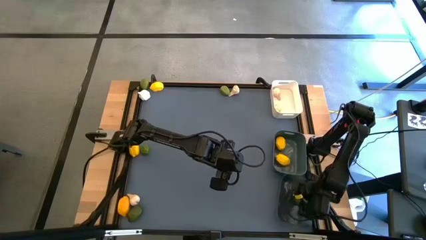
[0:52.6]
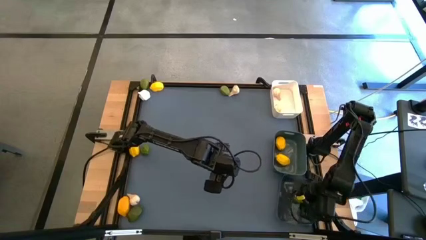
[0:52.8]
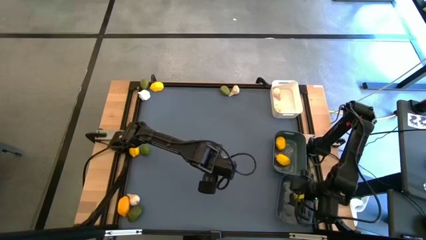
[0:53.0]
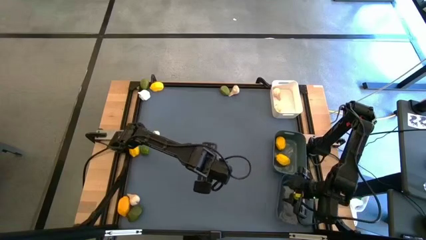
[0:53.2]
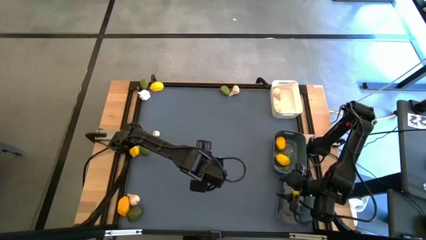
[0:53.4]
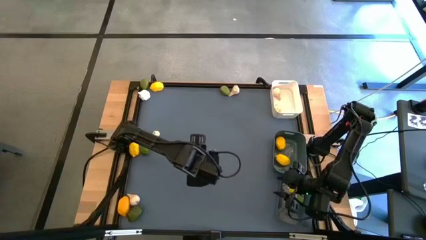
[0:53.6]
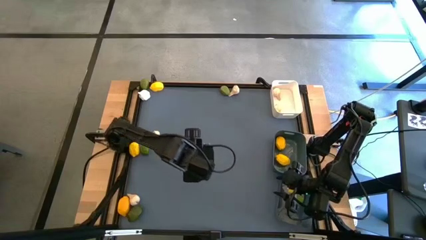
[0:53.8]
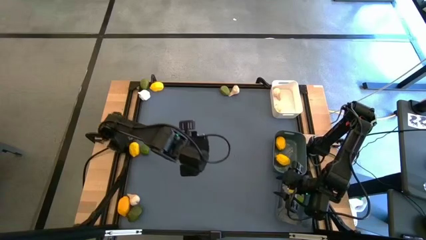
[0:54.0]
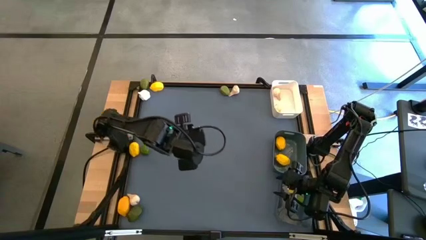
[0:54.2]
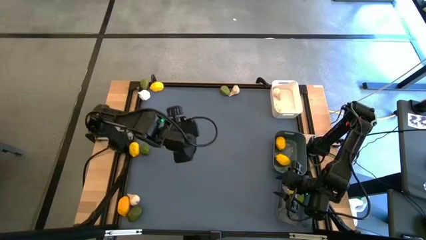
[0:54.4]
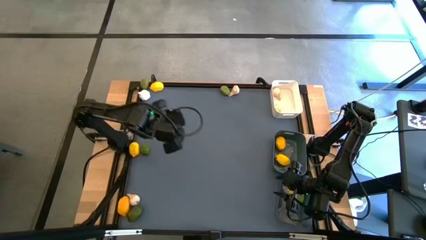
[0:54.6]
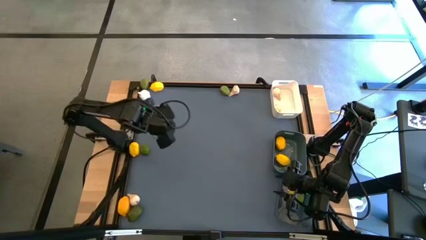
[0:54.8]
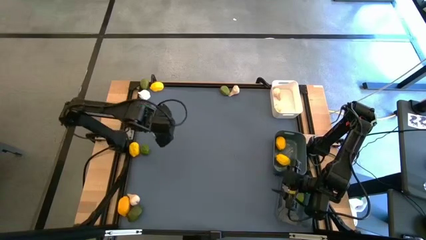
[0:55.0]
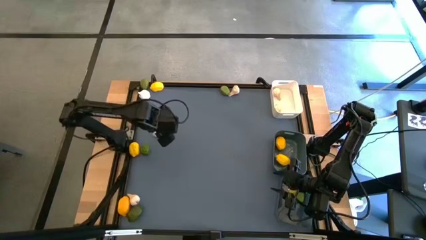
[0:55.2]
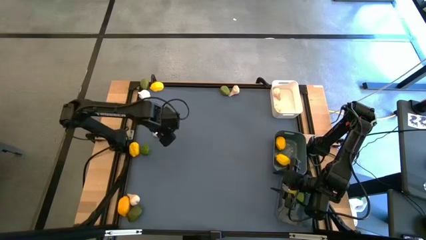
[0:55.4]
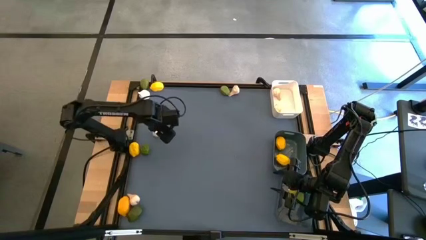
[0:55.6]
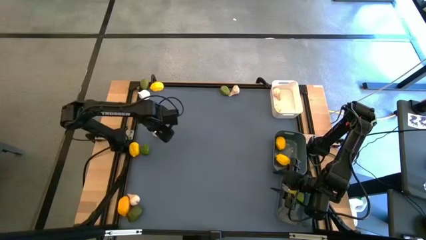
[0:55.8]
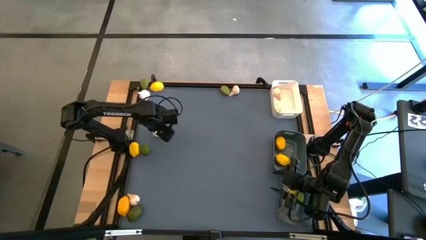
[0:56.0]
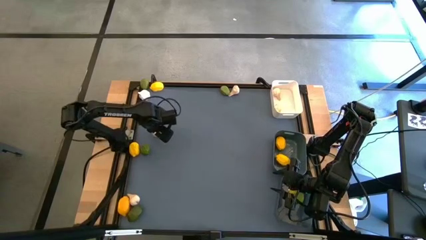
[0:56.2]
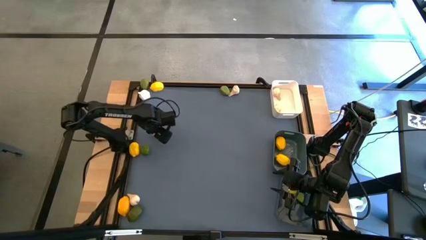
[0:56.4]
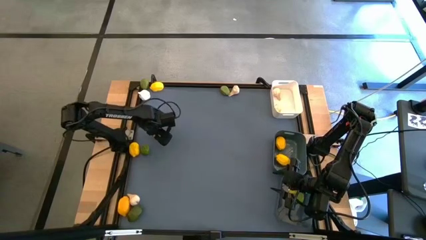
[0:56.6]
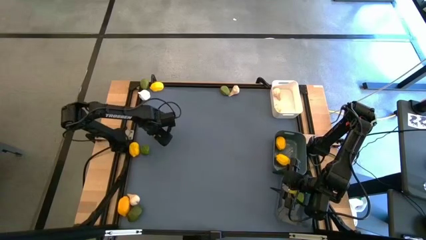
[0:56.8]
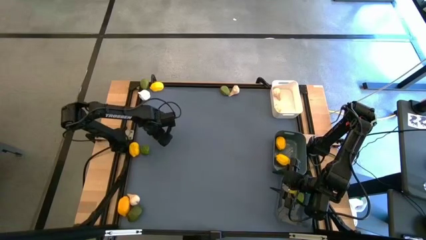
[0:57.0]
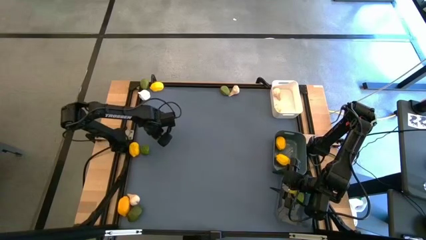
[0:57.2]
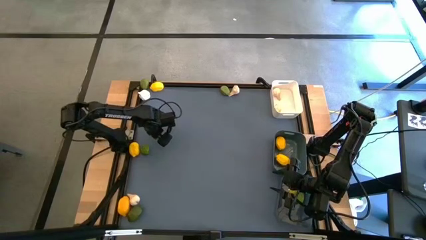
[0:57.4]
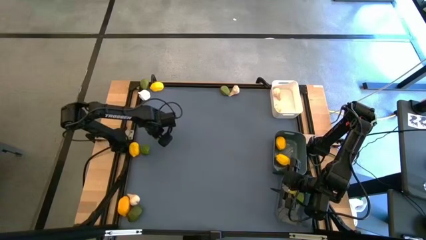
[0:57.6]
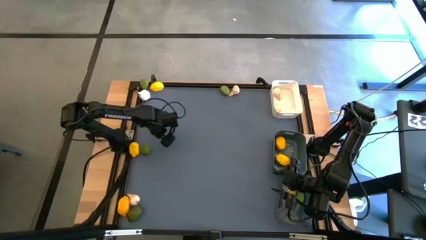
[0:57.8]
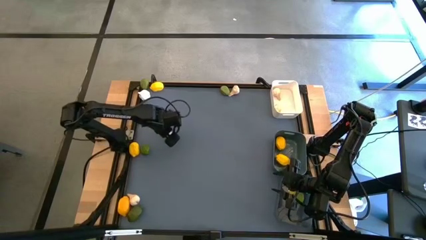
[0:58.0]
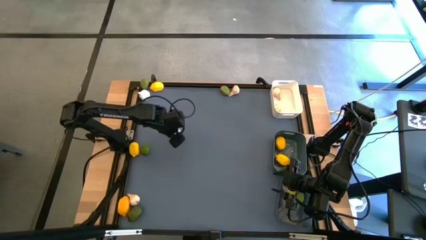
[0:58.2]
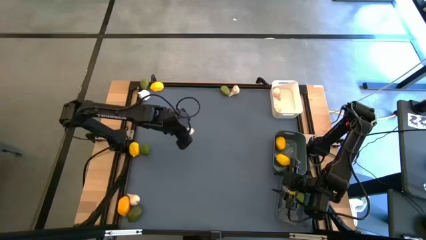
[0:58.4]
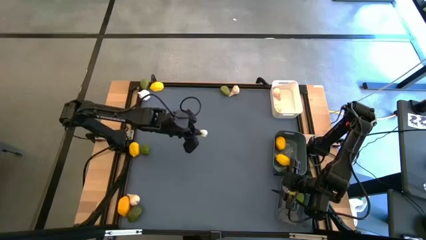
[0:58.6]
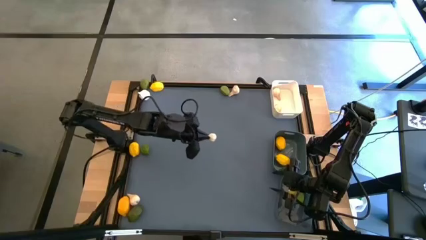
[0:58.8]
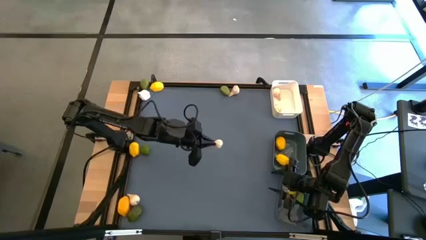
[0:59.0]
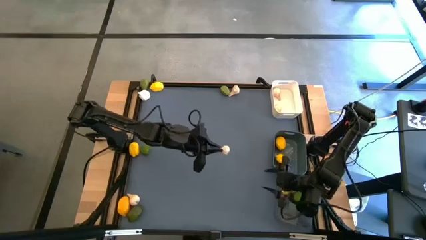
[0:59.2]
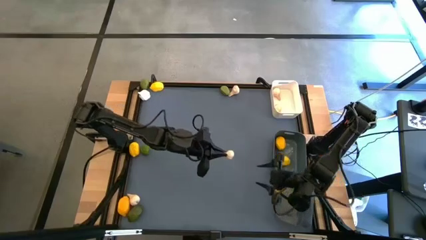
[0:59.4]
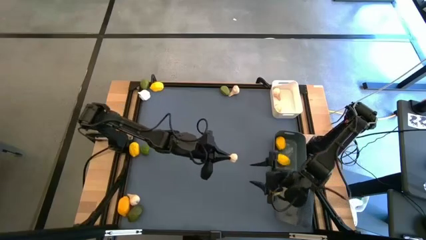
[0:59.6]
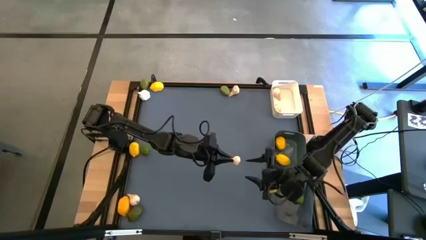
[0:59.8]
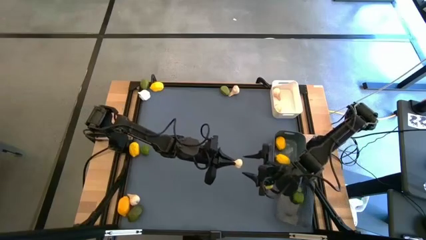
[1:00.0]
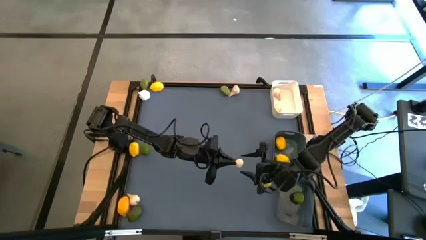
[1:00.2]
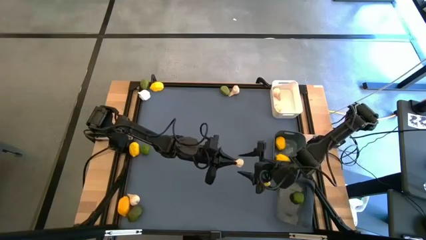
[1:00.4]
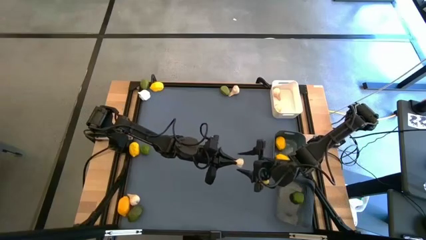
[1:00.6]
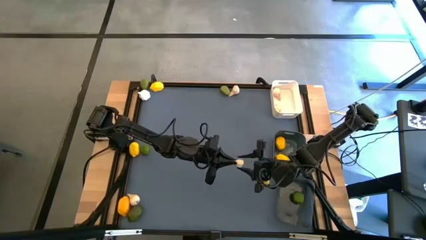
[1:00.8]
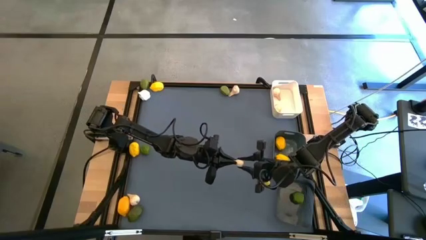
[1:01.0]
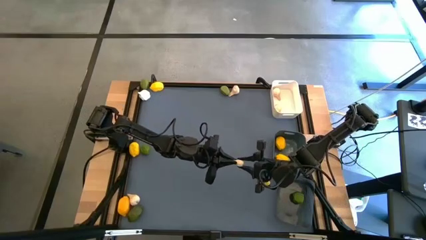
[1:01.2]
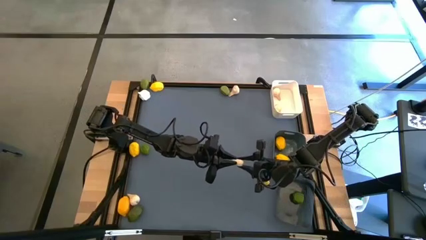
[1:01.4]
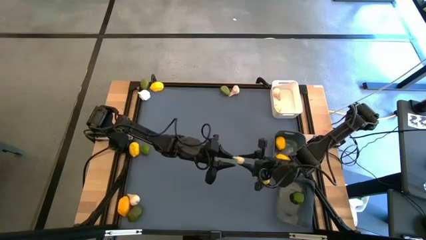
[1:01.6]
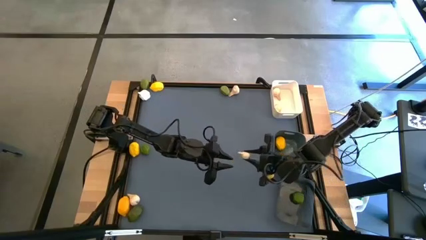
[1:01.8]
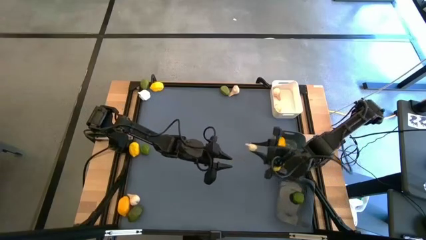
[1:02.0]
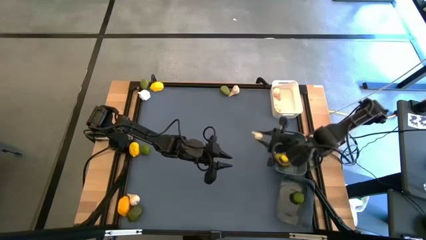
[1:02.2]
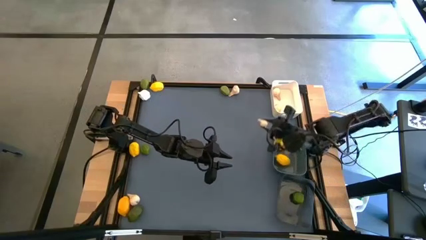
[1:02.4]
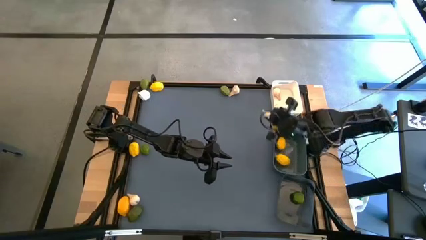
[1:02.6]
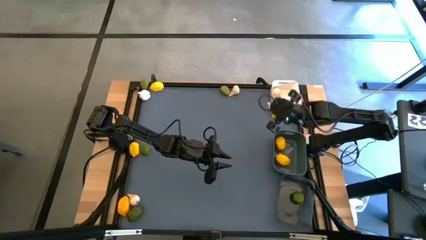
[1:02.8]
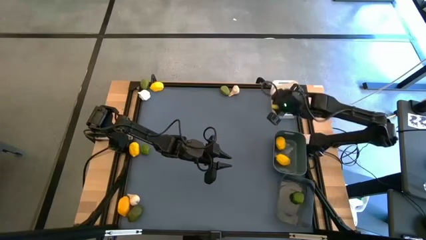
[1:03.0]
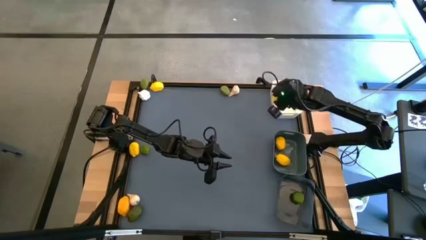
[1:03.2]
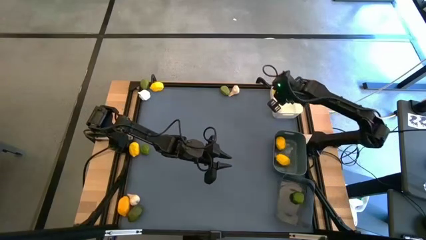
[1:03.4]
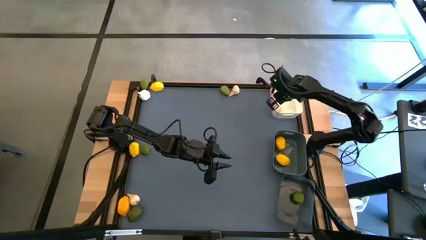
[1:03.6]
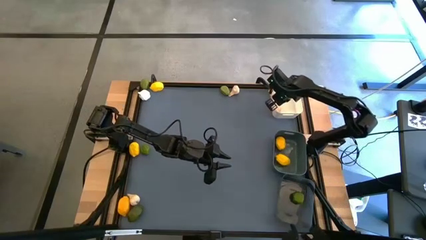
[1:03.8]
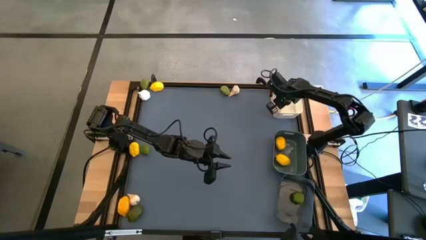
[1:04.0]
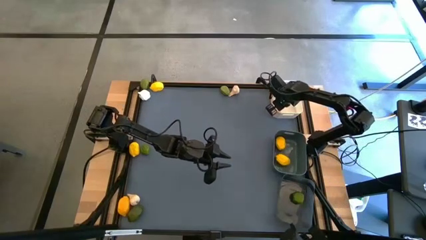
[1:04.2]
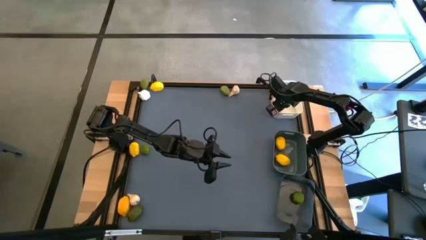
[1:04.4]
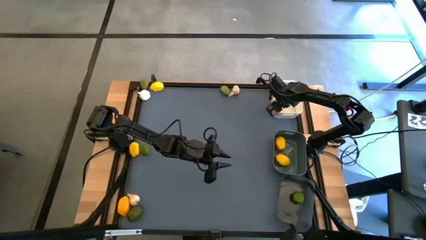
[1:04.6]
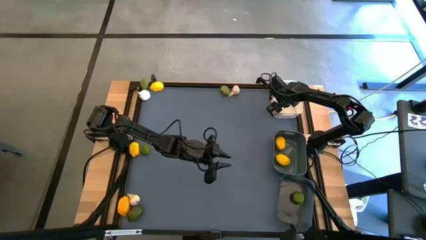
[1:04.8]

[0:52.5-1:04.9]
Task: Sort produce into baskets
Put the white garlic into the white bin

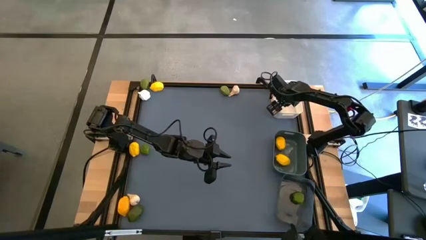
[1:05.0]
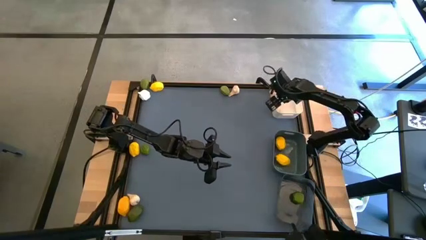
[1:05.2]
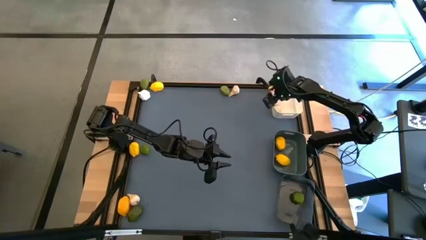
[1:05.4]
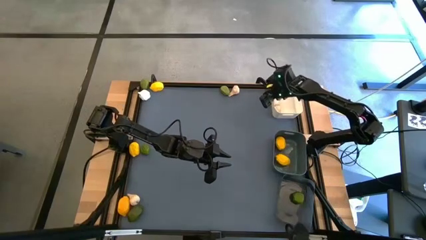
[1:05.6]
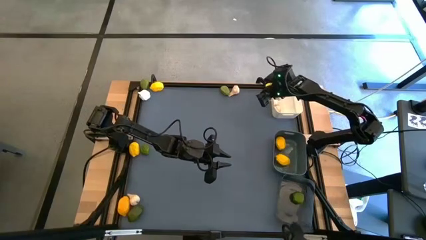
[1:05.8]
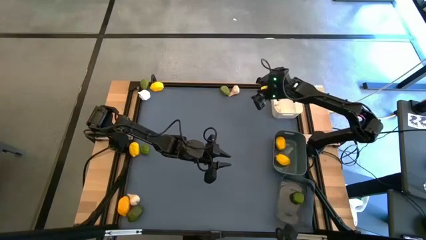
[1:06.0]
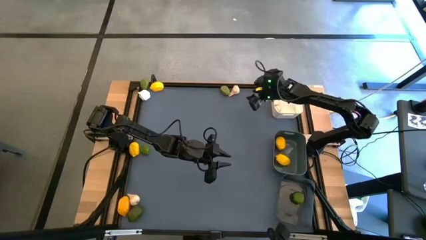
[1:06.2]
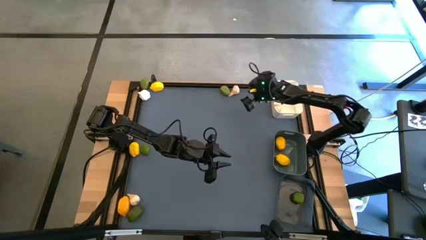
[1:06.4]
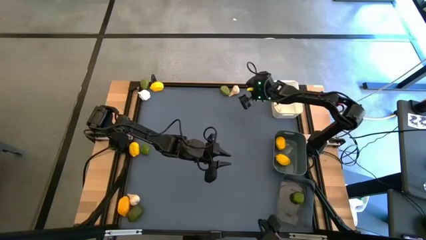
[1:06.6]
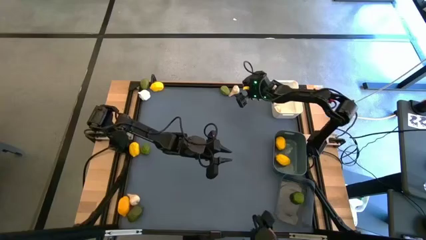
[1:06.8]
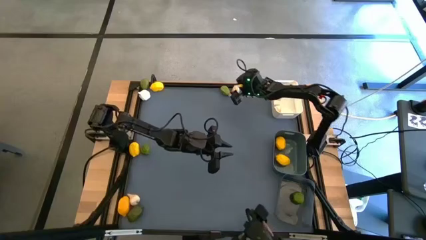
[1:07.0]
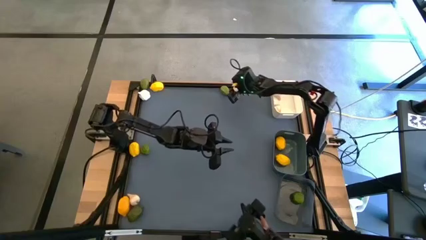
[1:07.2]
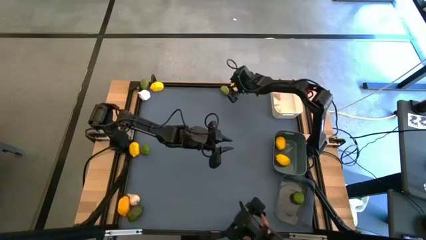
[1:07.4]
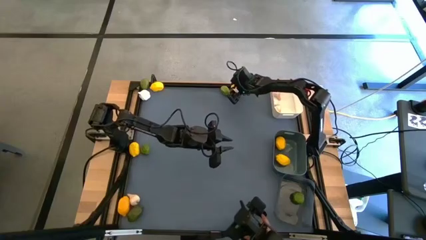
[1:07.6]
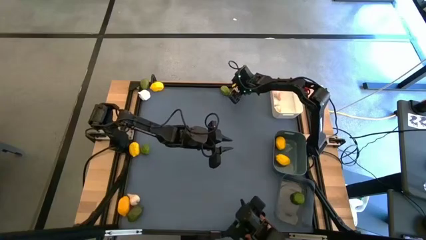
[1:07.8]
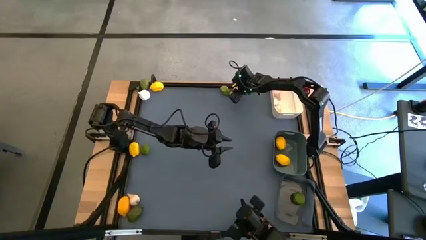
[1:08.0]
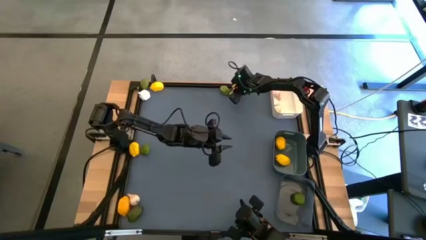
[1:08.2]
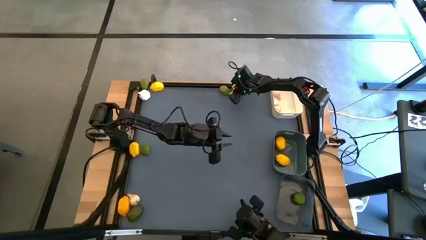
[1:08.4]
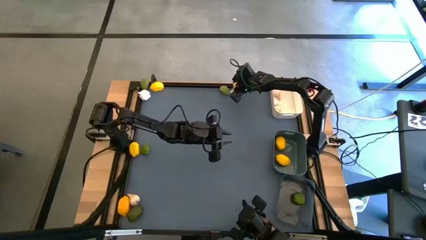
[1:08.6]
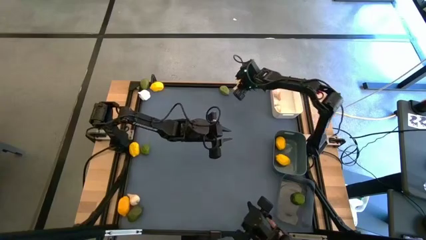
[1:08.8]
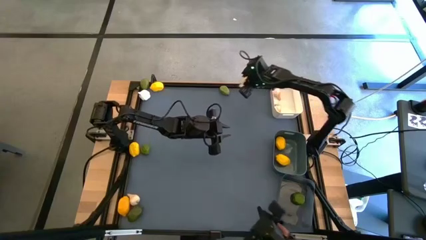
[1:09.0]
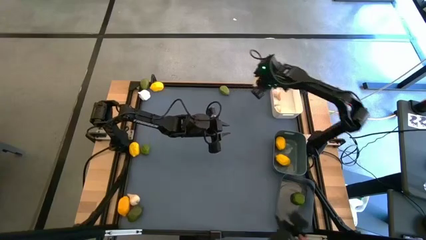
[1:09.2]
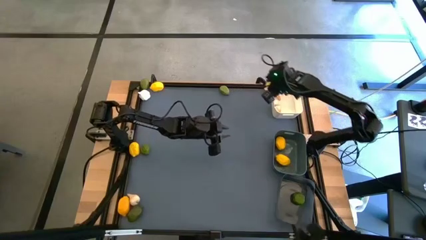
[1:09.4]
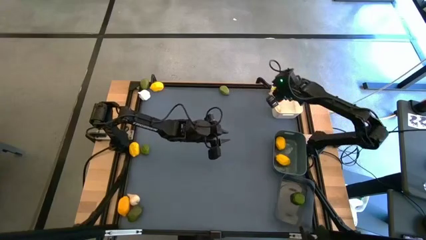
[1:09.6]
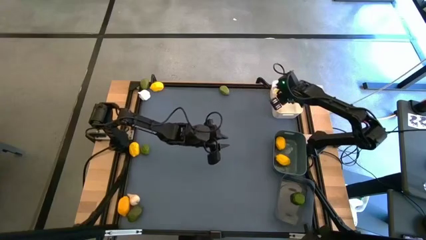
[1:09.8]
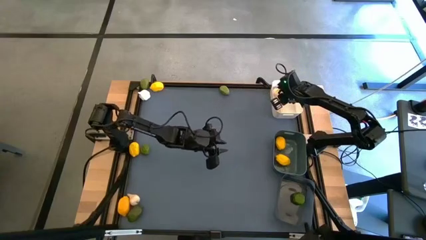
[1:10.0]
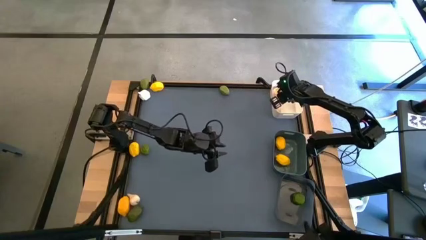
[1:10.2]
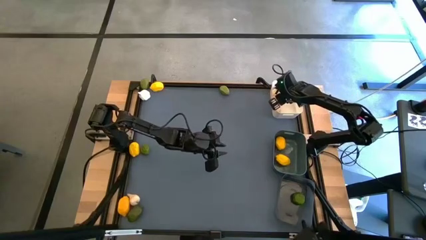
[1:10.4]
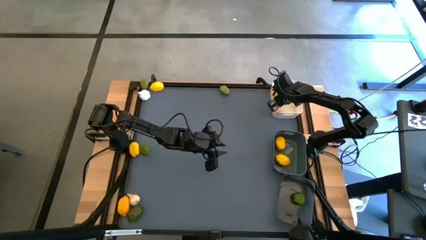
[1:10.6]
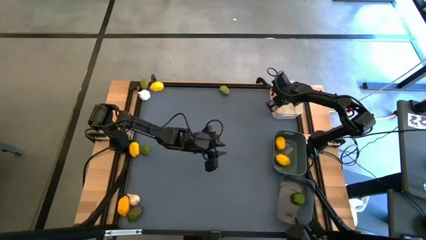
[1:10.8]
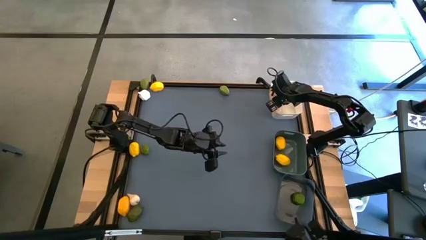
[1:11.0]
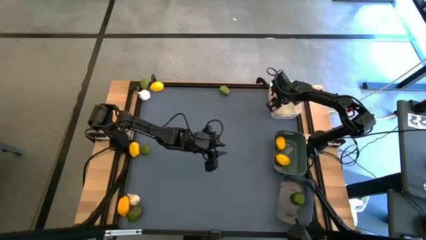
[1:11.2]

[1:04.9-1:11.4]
Put the white garlic into the white bin
